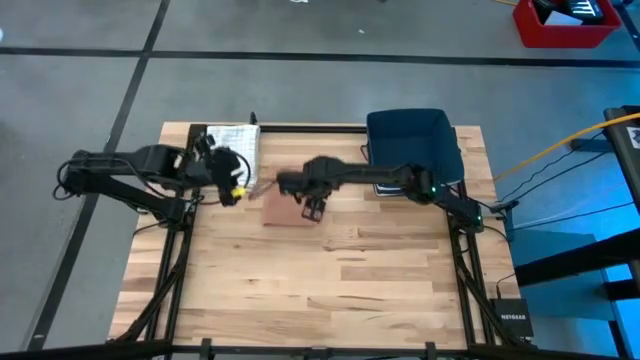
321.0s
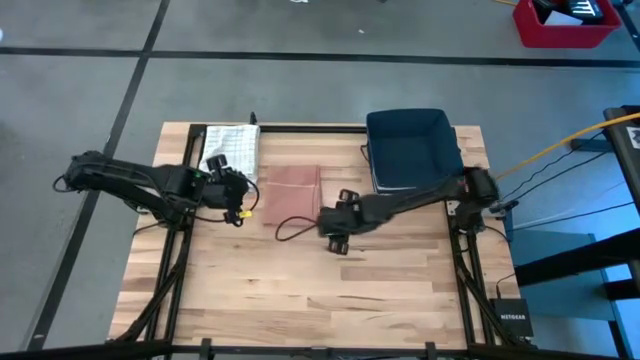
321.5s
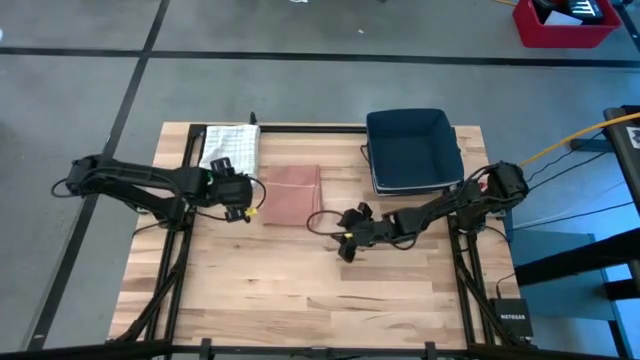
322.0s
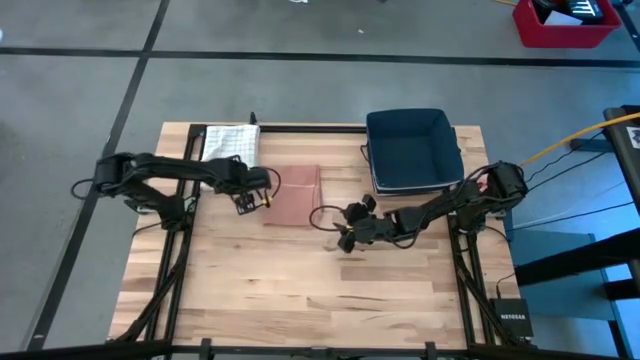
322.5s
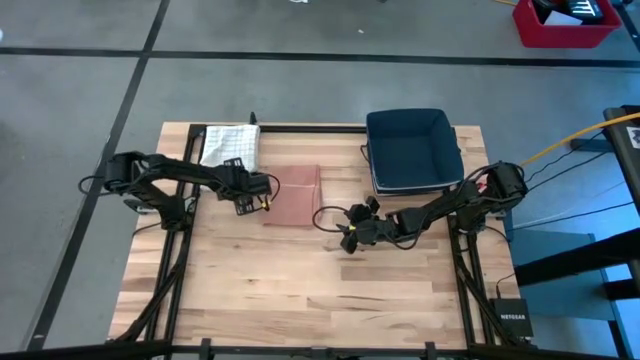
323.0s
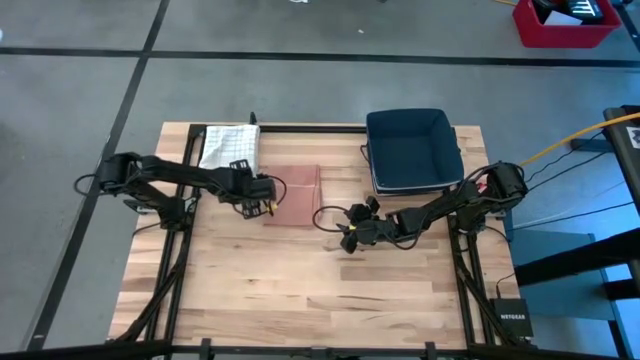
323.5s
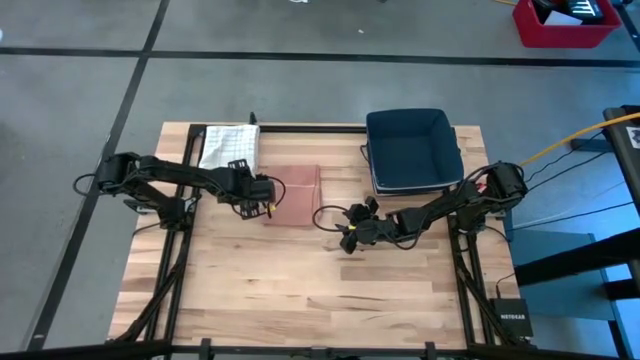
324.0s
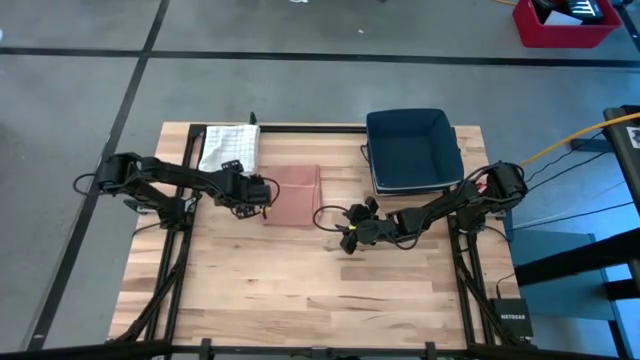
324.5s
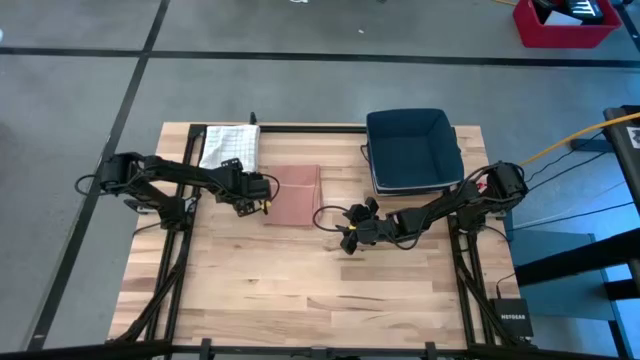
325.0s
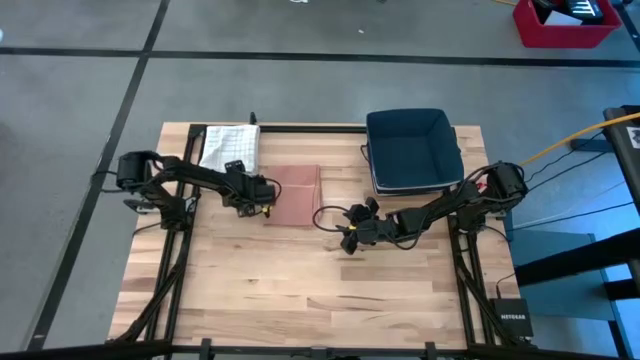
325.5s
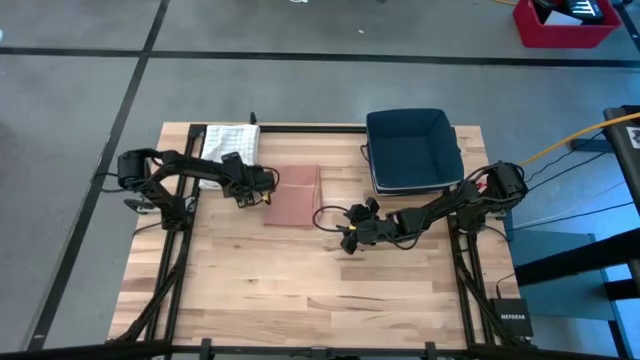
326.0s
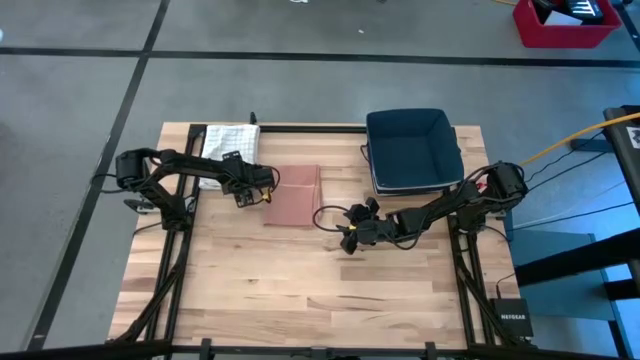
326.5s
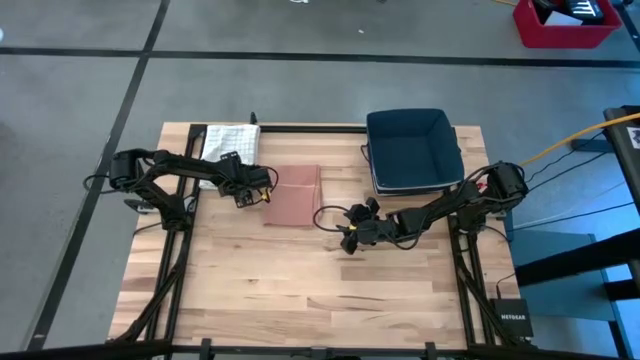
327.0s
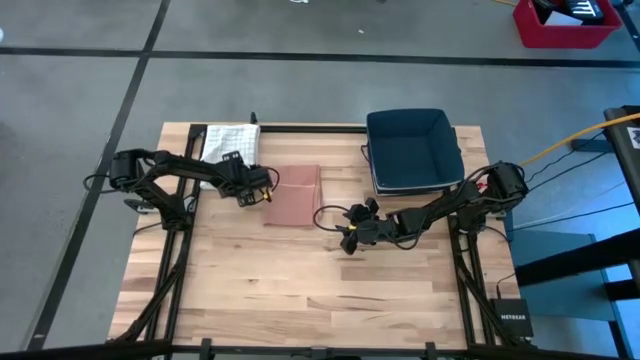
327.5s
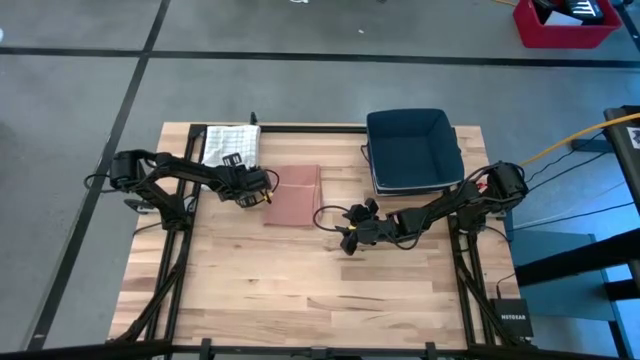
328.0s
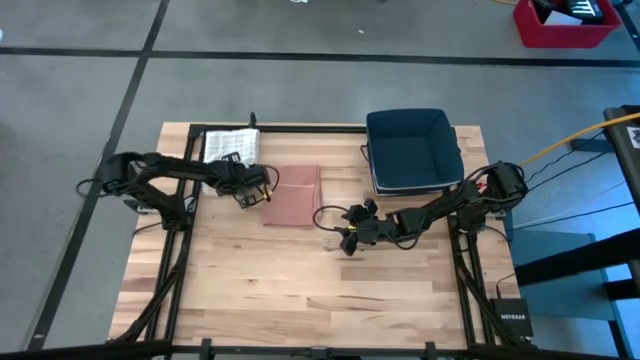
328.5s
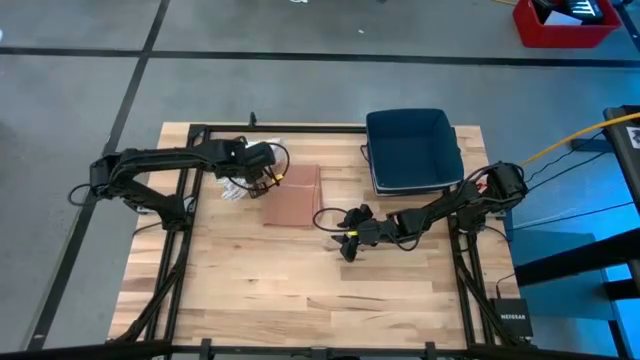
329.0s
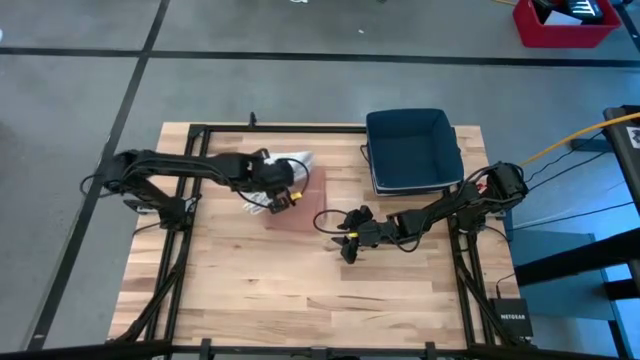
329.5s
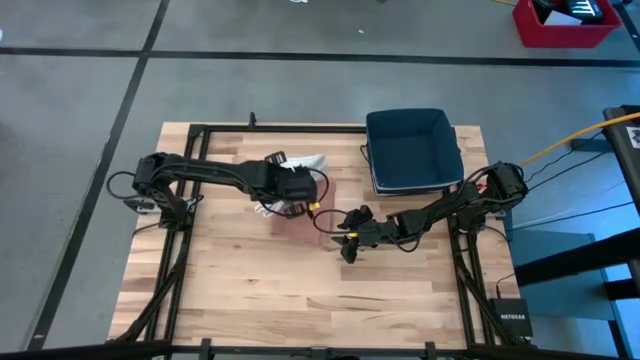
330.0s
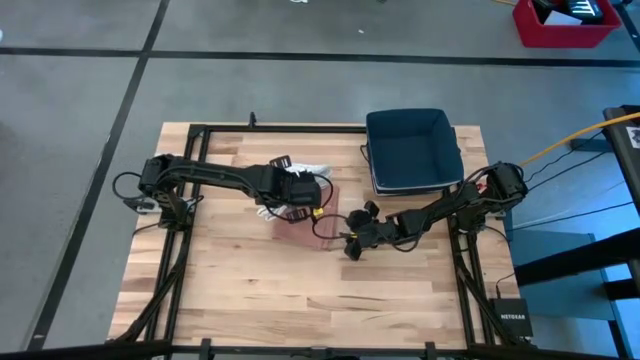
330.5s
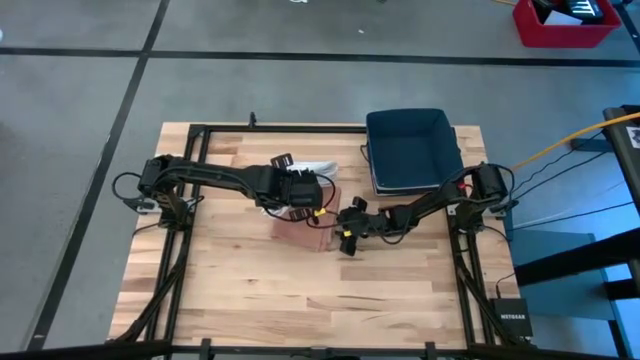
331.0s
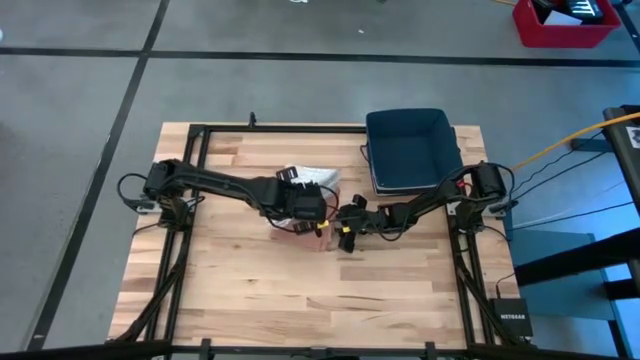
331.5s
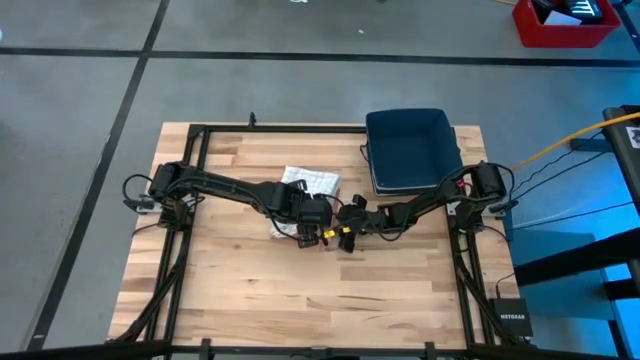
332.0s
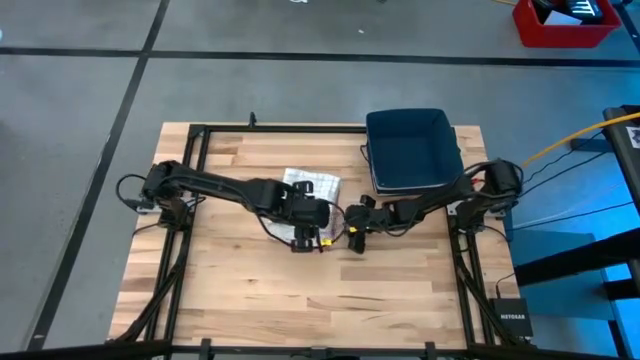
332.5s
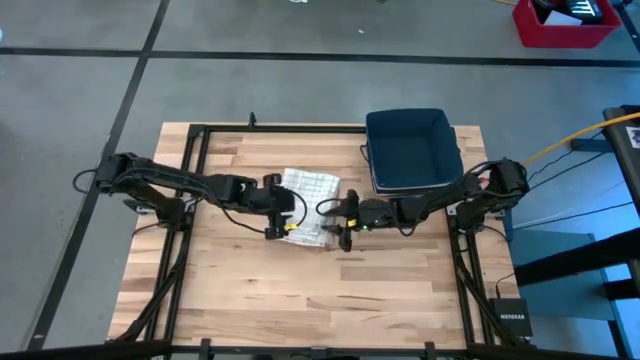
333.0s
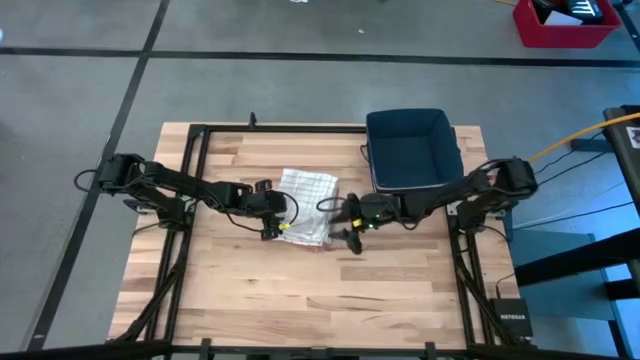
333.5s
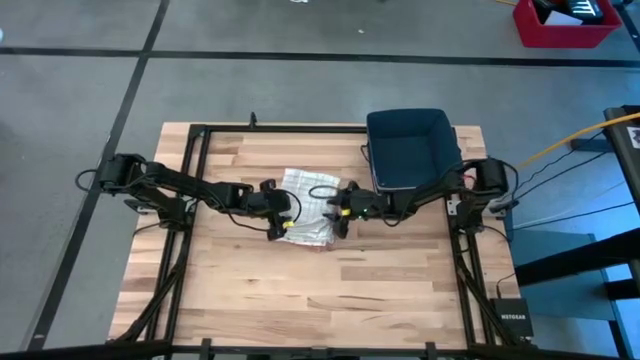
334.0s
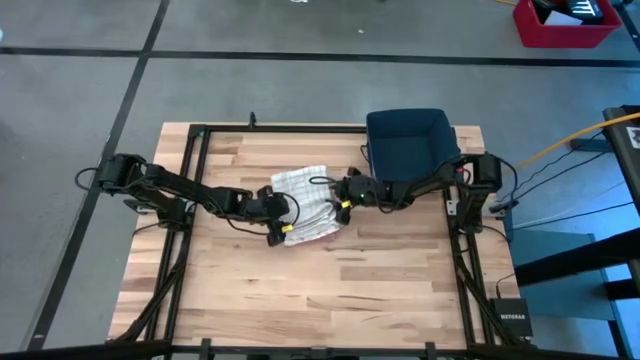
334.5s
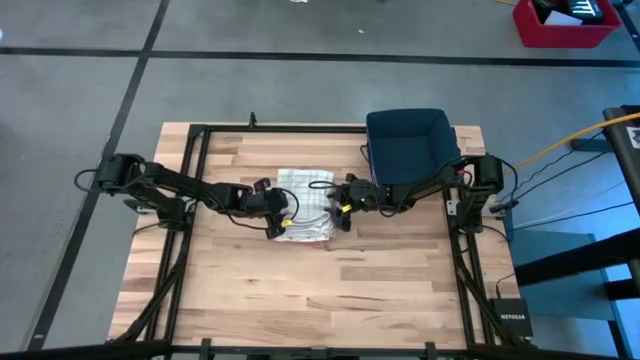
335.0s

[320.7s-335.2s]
Task: Fold towel
Stack the folded stacked towels on the top of the brown towel

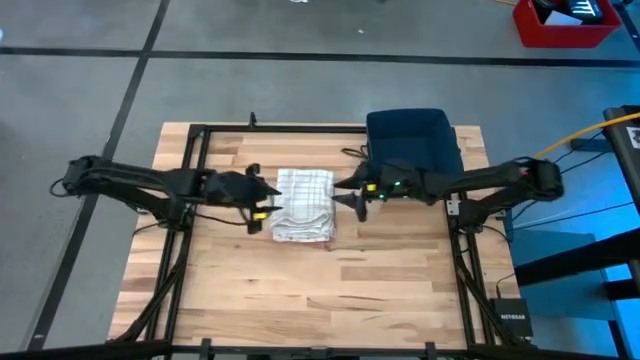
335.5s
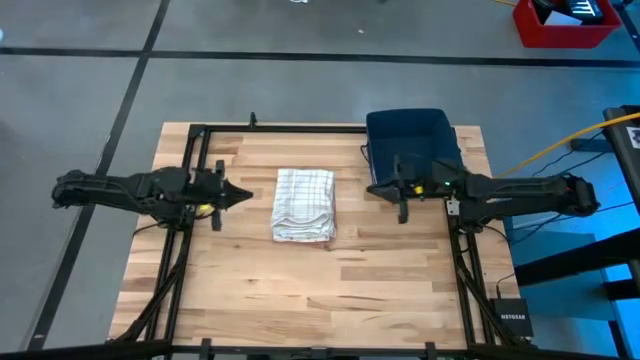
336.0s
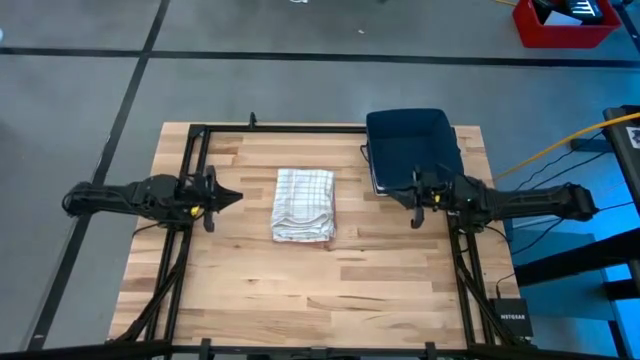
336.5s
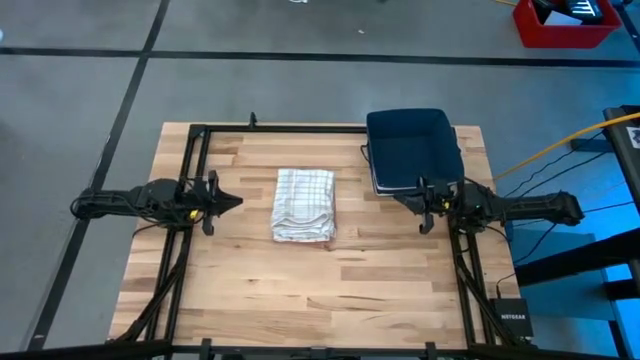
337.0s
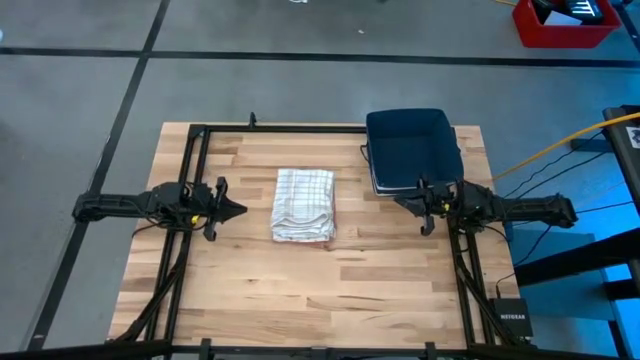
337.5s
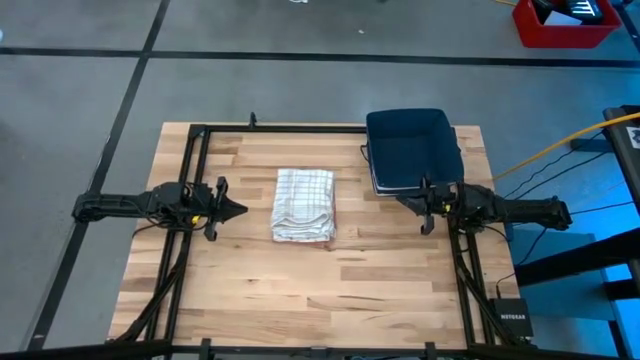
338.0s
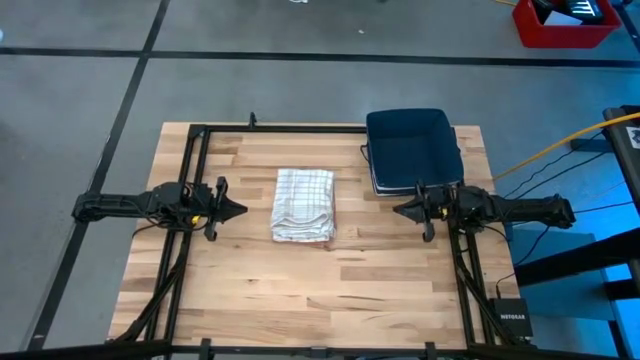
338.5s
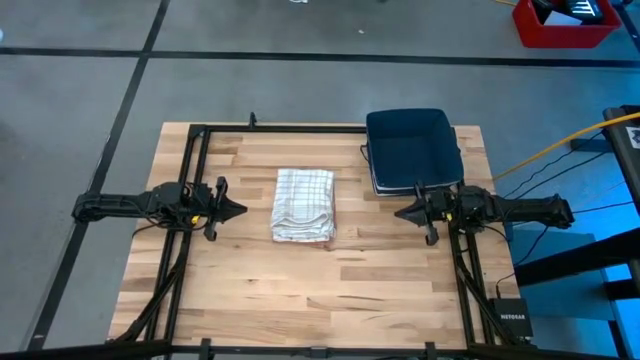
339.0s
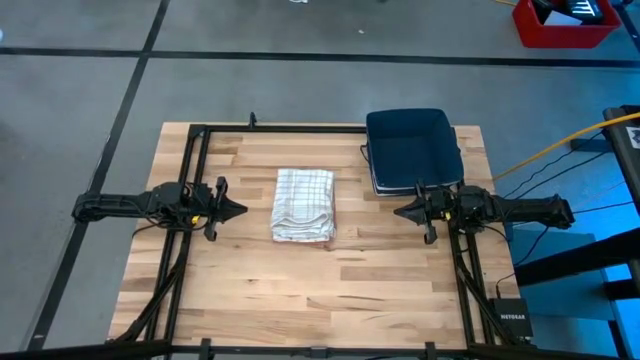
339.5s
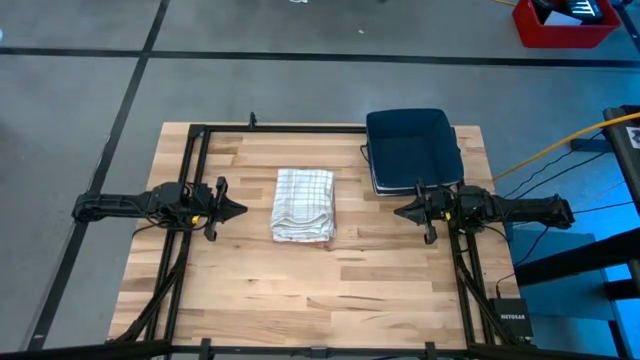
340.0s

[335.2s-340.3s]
Return to Home Position
